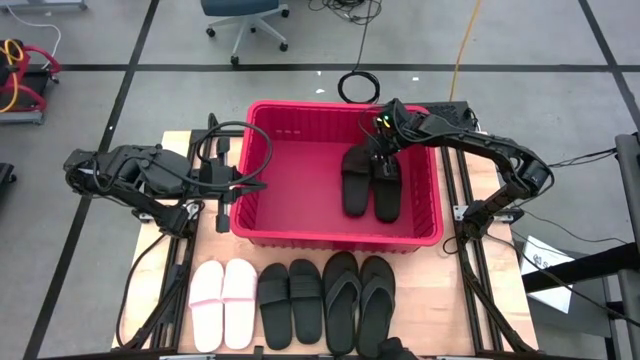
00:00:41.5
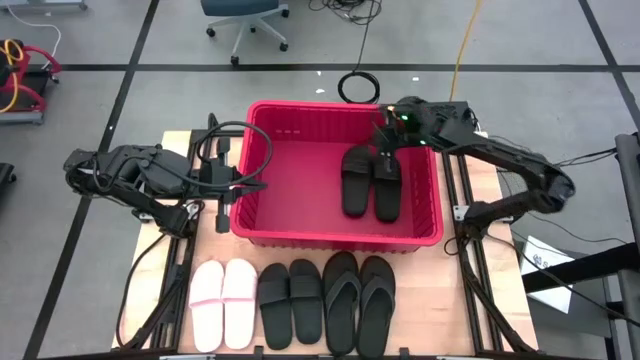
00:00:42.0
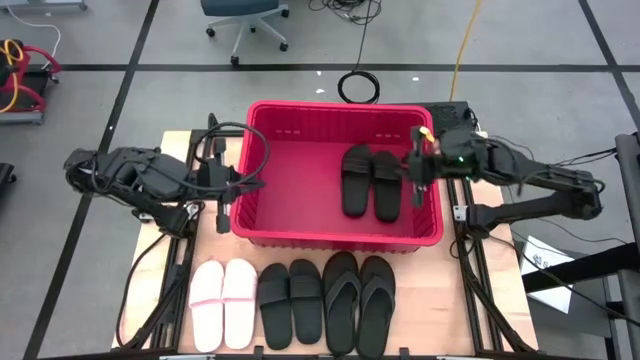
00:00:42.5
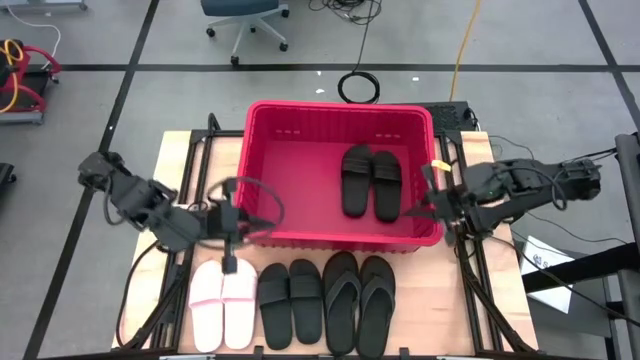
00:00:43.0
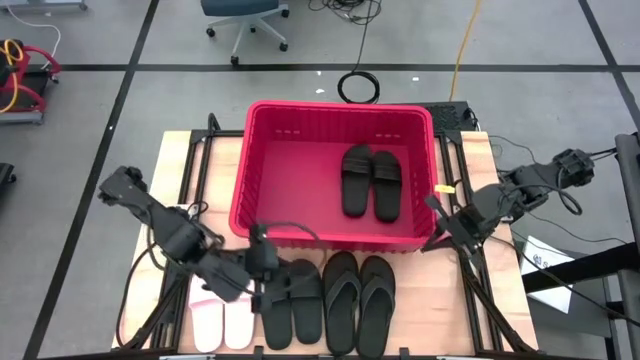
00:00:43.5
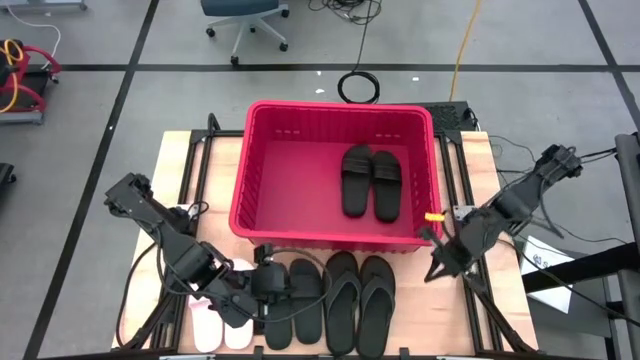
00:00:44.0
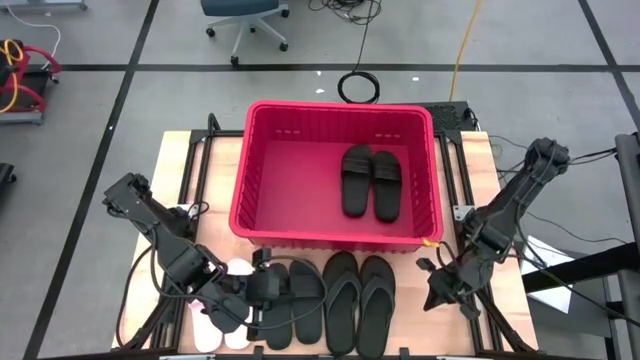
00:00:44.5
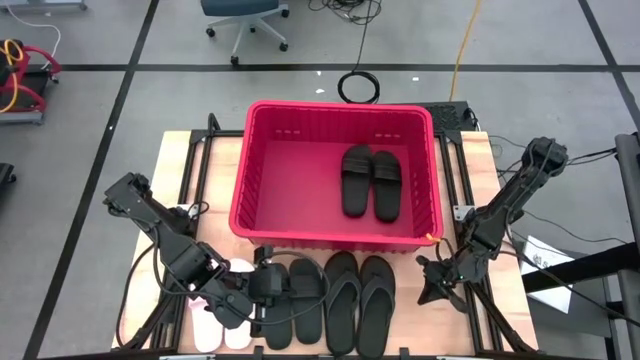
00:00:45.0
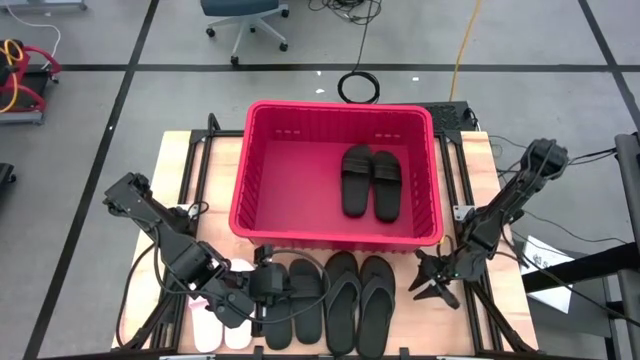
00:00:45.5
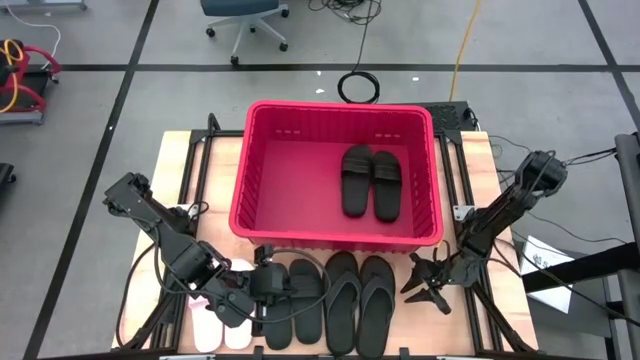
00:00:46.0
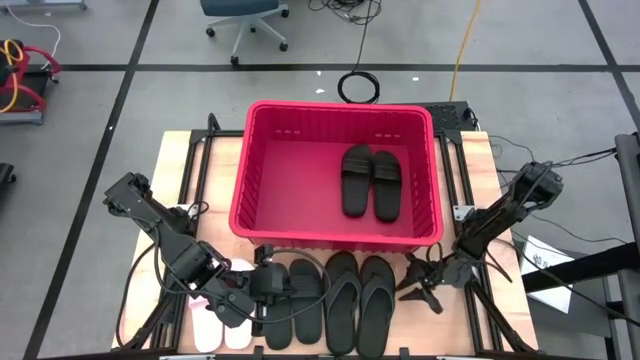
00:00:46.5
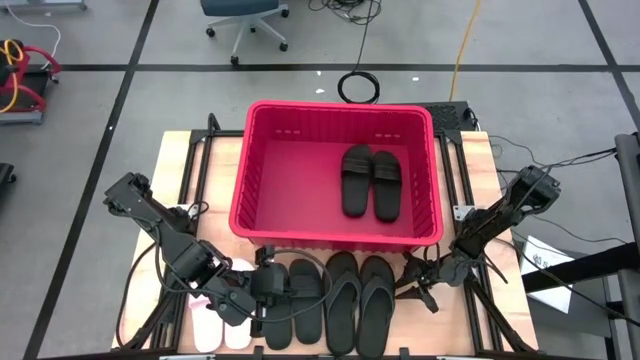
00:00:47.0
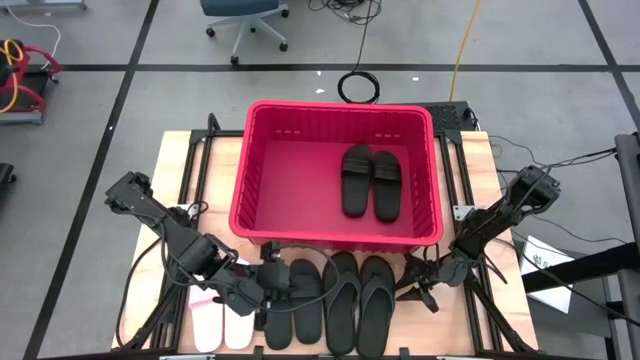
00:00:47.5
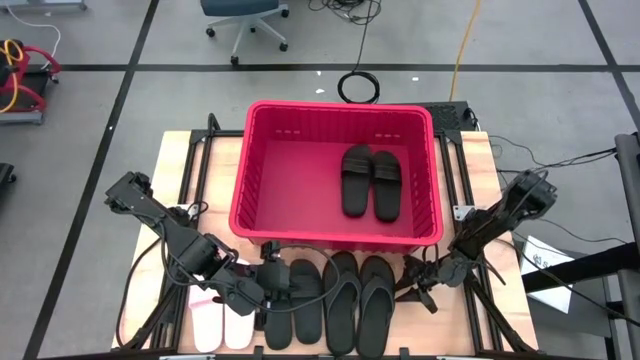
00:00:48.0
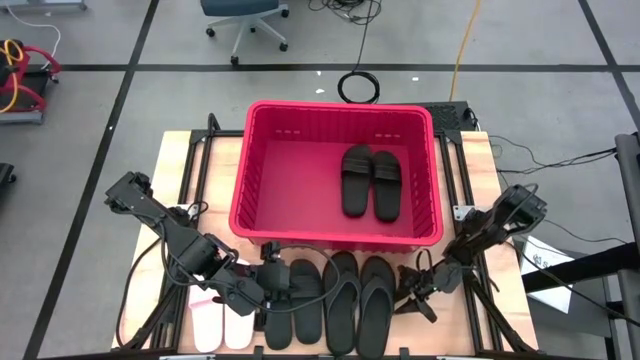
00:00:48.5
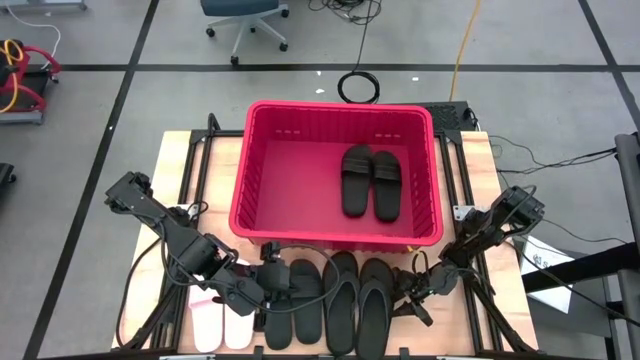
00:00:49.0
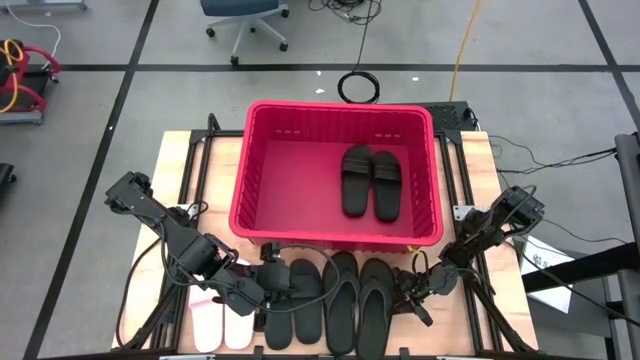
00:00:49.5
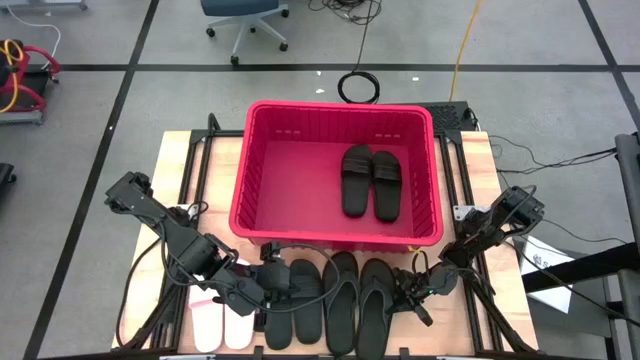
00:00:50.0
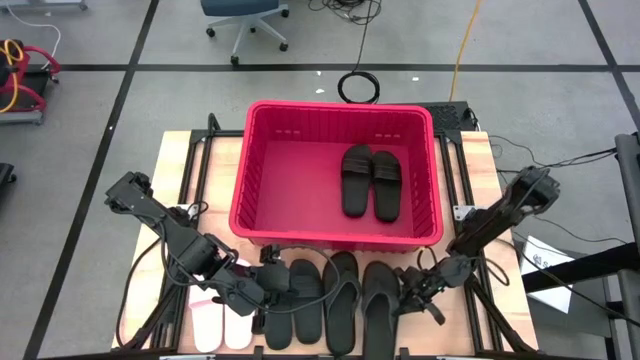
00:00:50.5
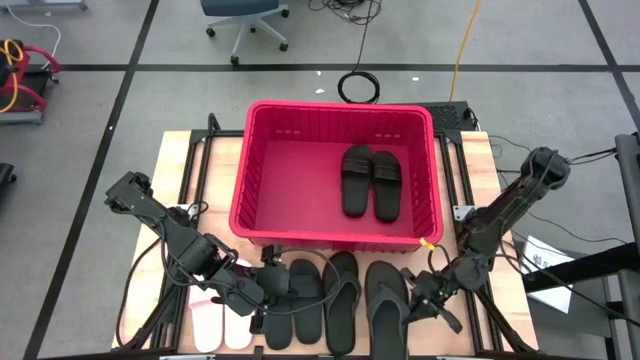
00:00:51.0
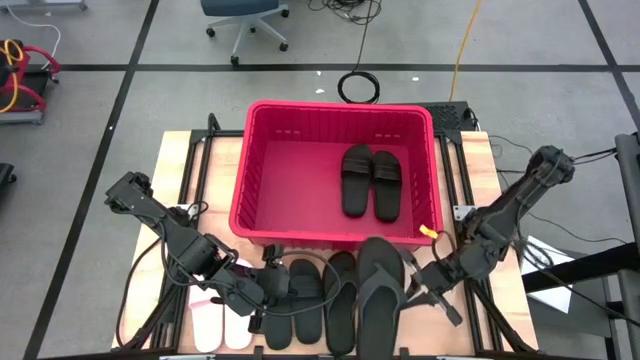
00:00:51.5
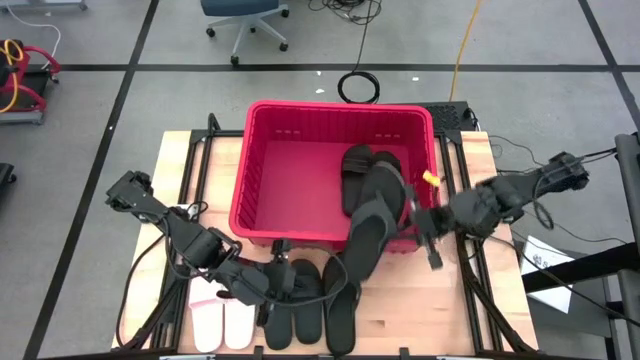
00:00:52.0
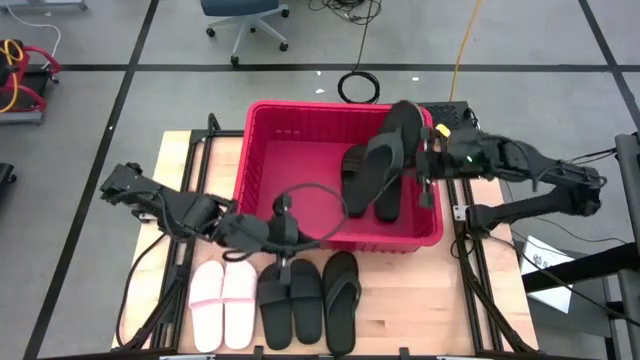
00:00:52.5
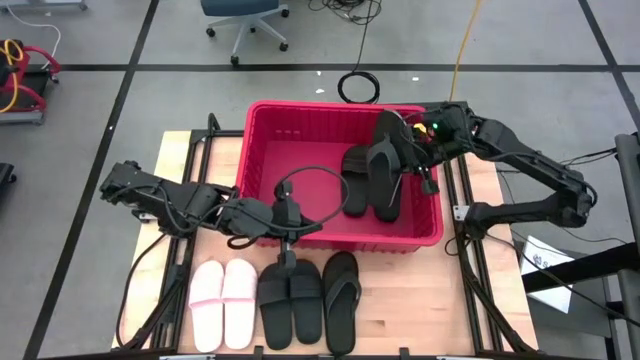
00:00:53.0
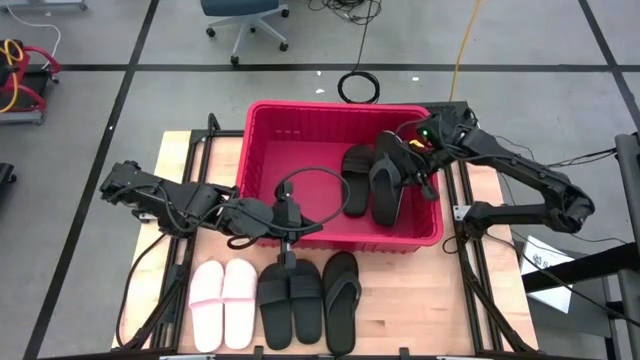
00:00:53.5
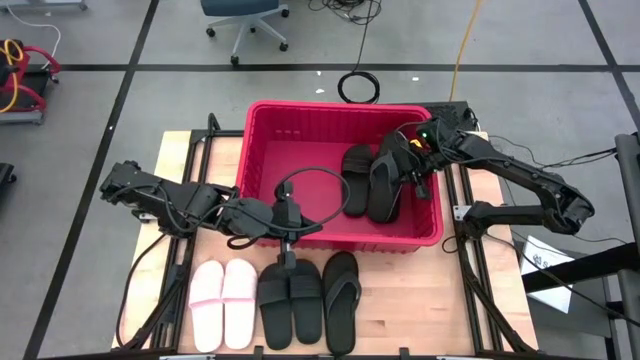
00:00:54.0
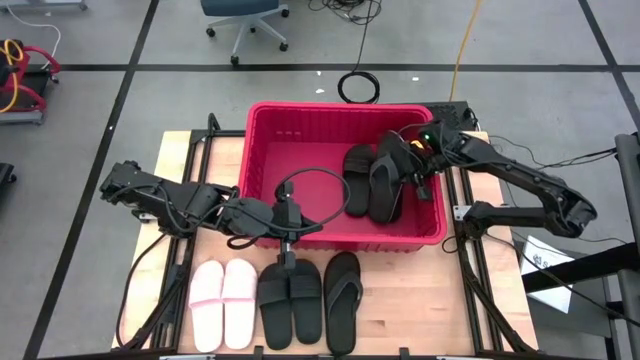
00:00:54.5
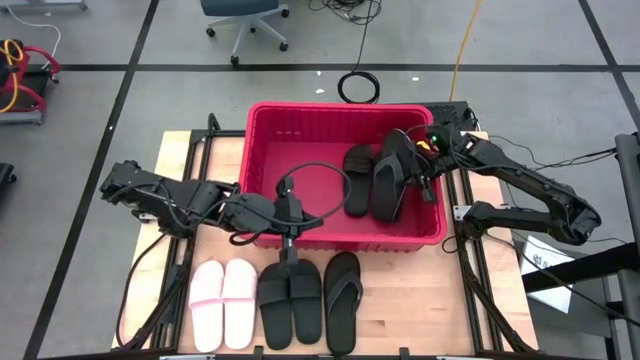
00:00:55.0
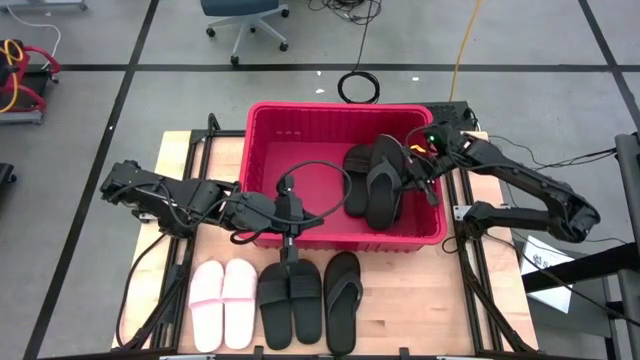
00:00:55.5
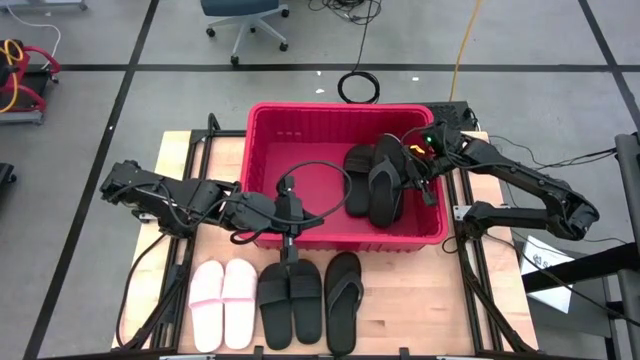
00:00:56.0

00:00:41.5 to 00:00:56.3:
Task: Pick and place slides into bin
Put the black slipper into the red bin
